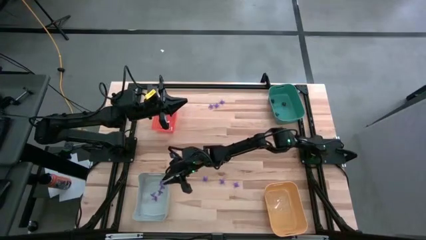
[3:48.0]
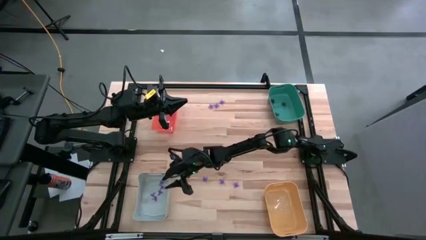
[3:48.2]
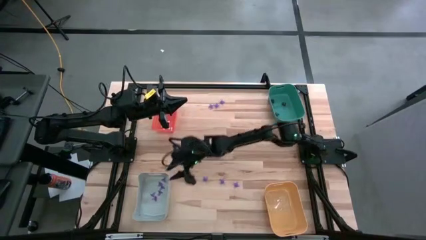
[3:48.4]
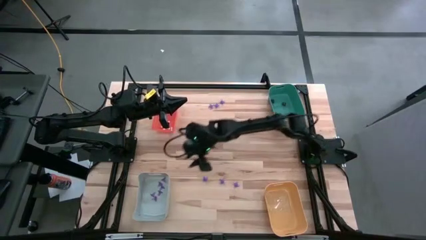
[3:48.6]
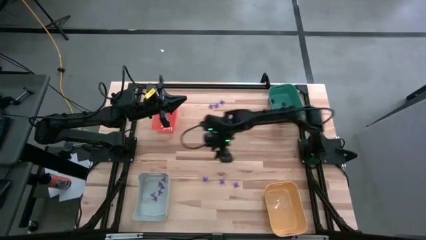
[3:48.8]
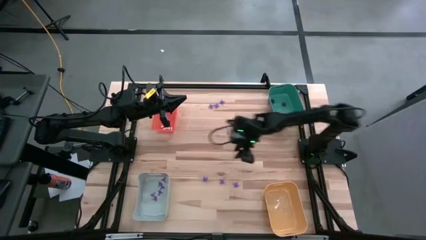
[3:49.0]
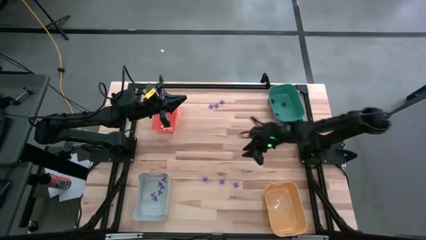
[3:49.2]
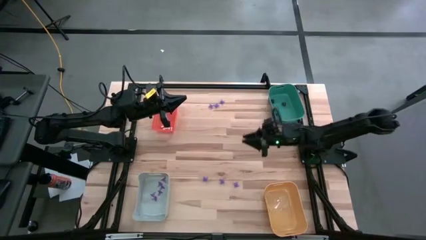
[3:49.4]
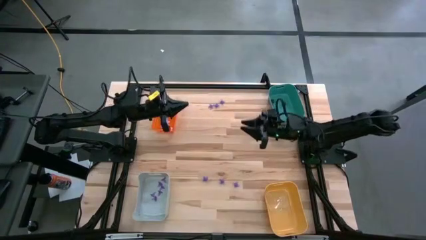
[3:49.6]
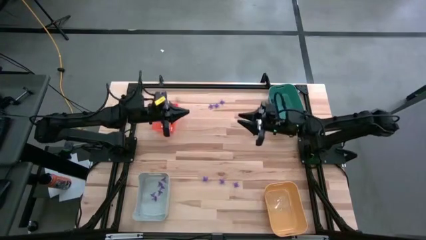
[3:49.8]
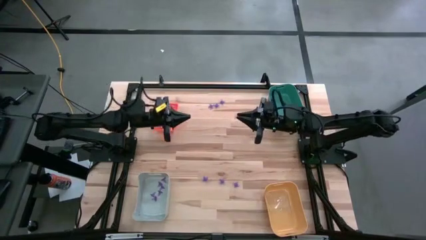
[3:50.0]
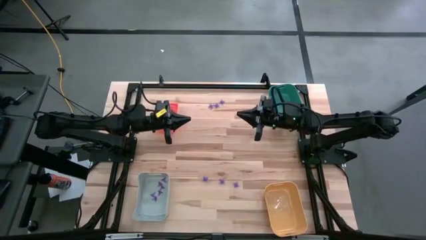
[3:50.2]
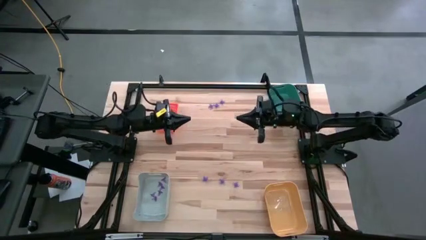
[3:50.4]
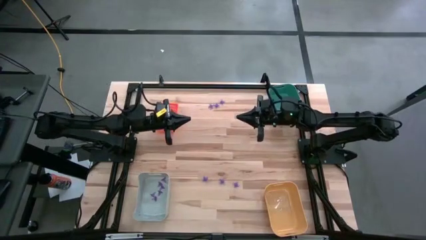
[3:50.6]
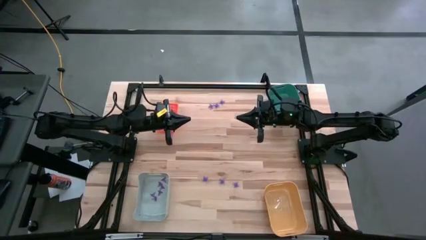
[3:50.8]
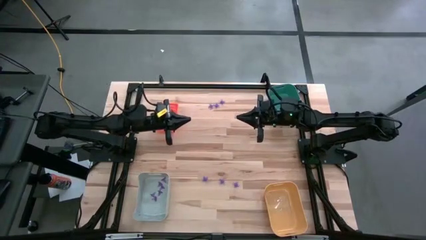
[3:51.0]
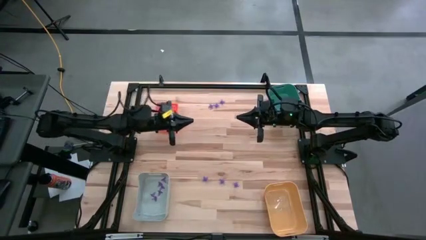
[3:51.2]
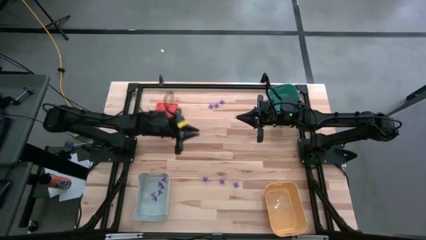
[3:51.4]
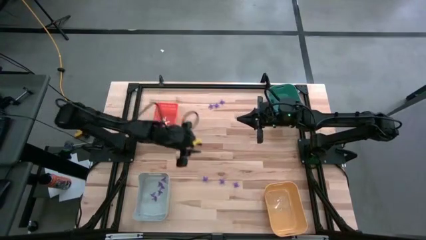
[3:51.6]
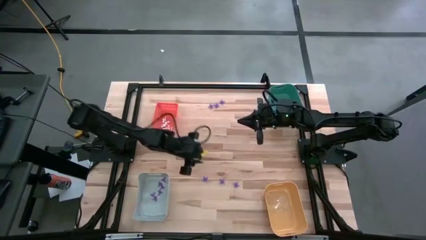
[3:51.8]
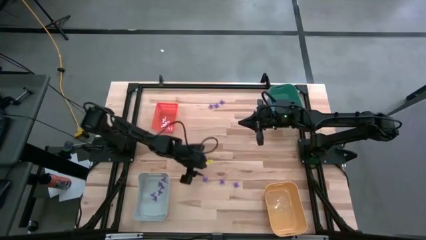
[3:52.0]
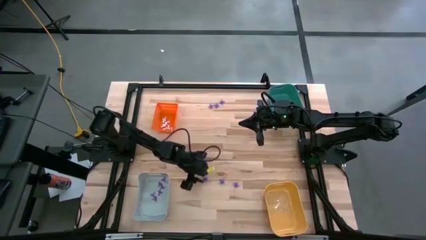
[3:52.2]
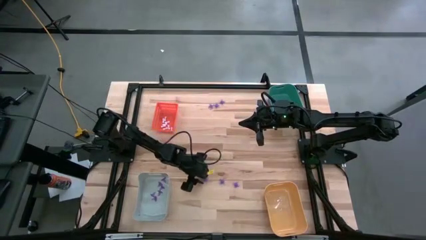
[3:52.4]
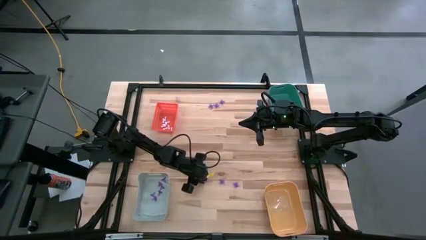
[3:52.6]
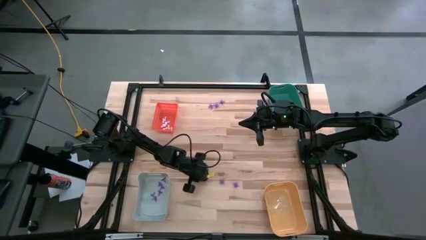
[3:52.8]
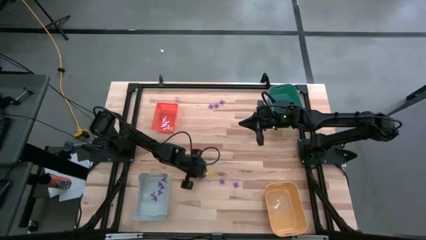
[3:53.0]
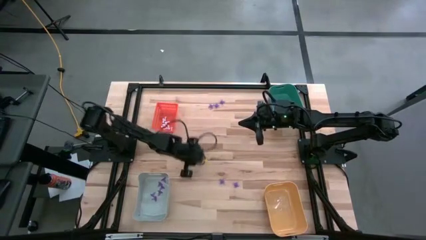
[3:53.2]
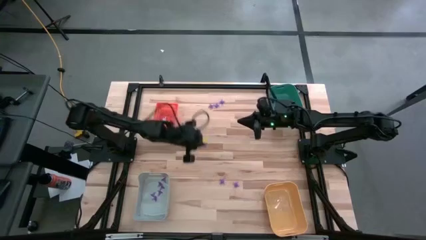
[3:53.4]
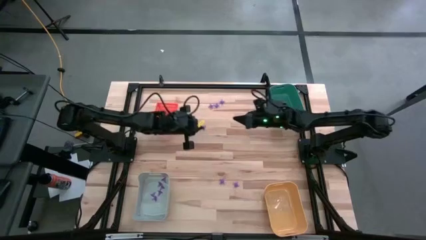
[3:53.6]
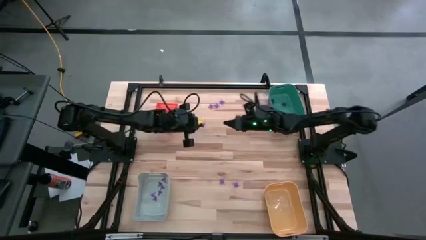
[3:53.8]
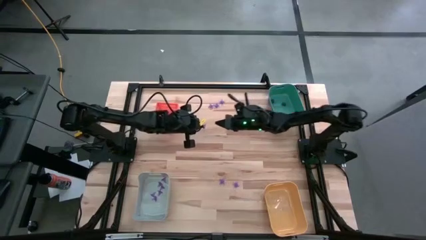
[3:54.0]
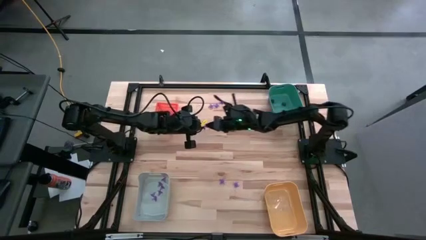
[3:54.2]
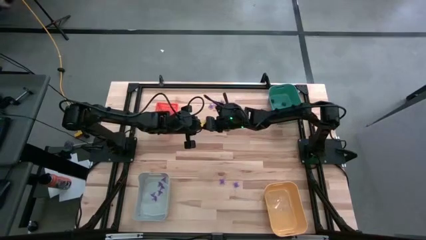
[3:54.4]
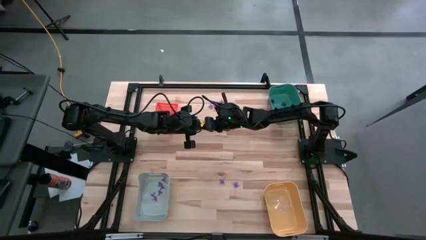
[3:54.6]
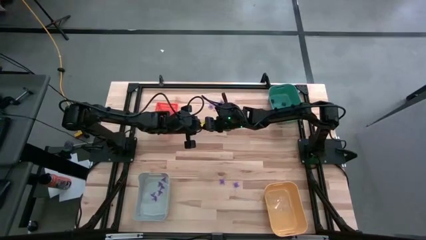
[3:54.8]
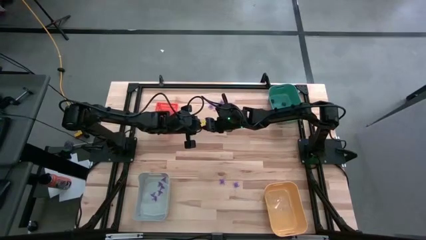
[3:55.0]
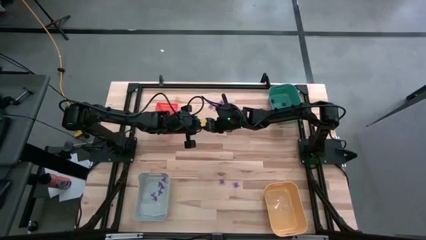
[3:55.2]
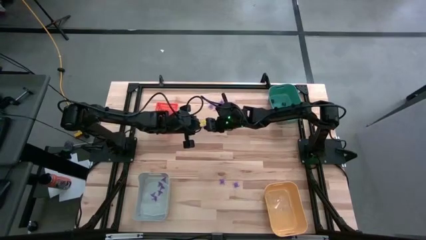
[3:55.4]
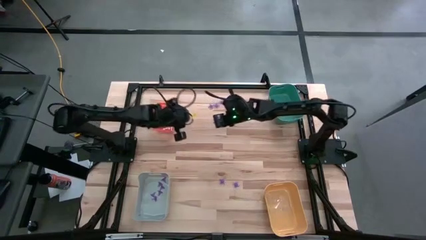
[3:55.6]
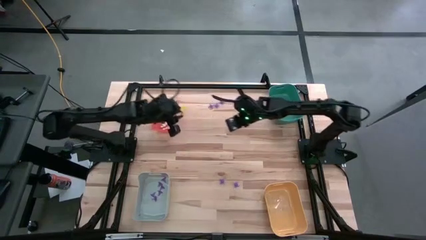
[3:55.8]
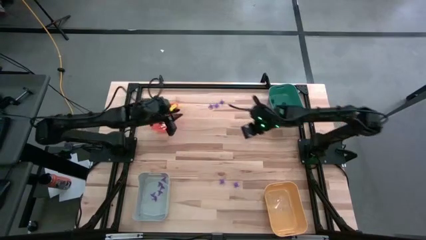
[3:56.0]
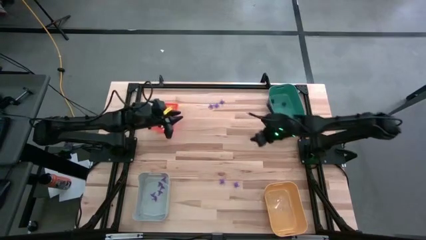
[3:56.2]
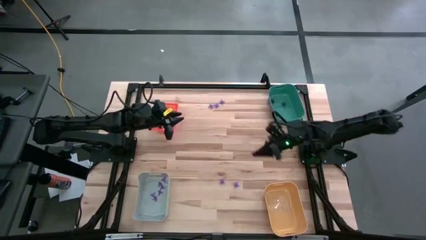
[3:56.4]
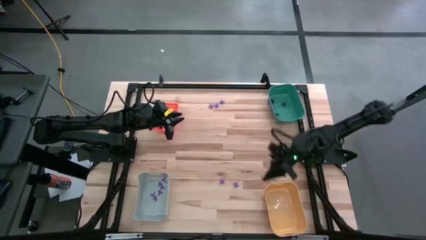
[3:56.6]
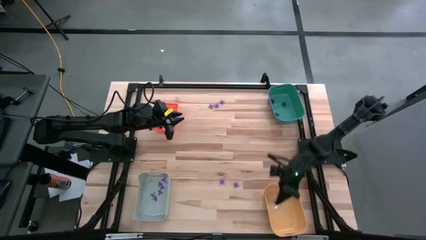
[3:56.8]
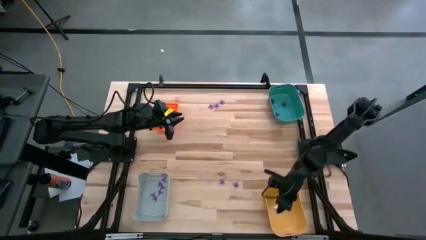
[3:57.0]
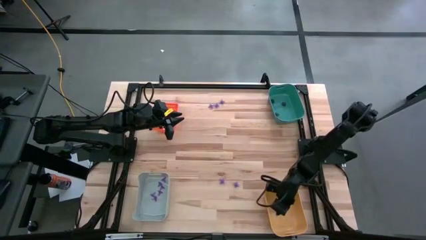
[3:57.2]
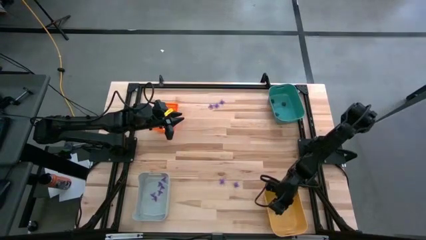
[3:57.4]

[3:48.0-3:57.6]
Task: Sort Halloween decoration
Put the violet spider toy into the yellow bin
